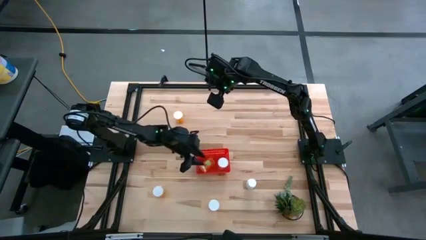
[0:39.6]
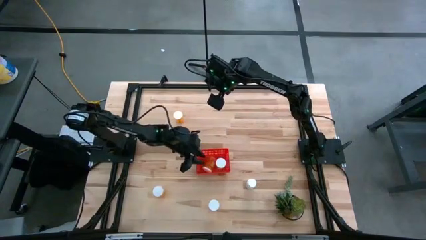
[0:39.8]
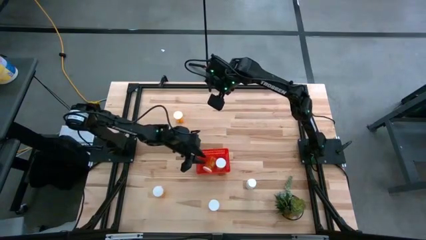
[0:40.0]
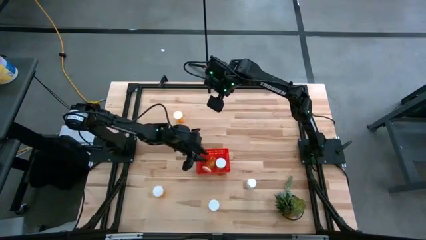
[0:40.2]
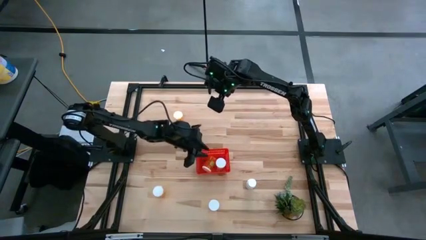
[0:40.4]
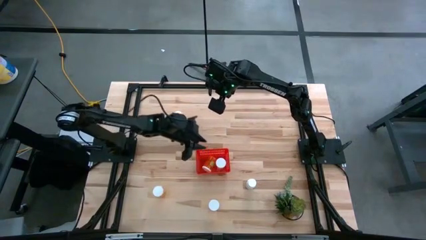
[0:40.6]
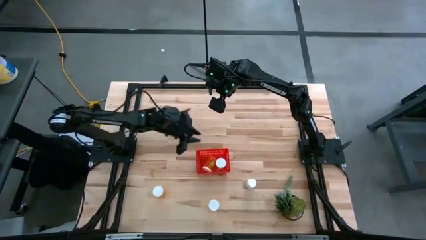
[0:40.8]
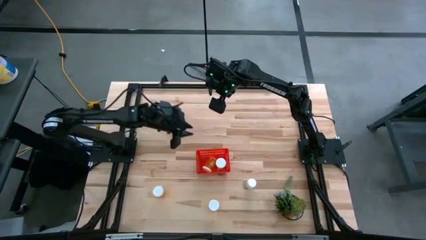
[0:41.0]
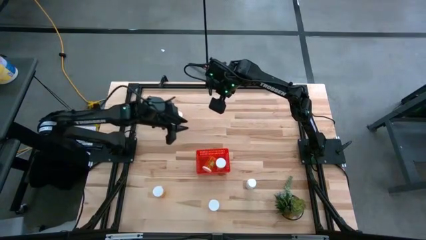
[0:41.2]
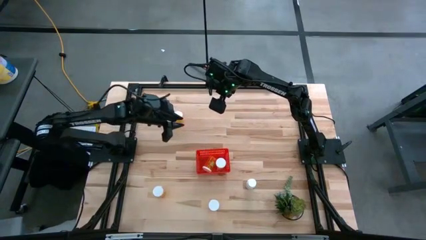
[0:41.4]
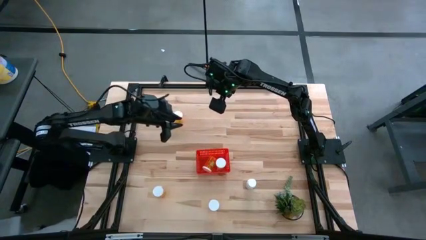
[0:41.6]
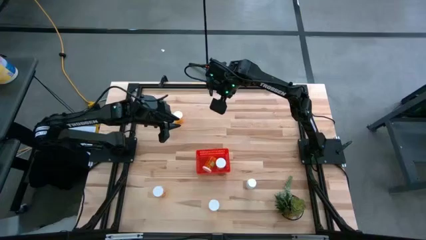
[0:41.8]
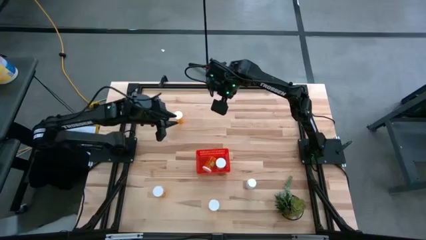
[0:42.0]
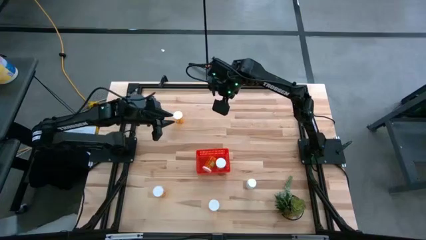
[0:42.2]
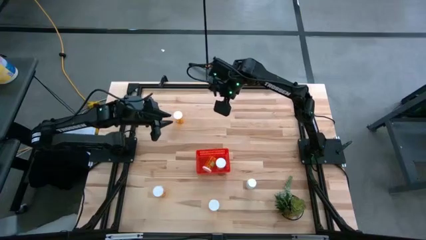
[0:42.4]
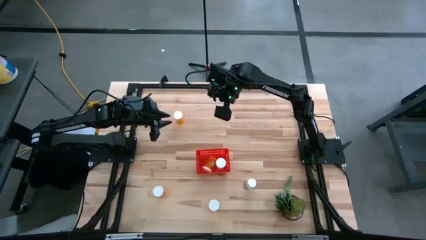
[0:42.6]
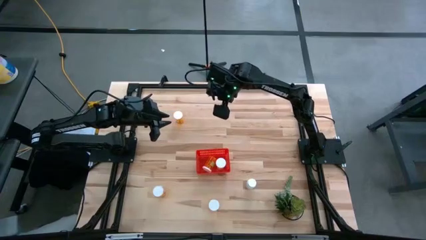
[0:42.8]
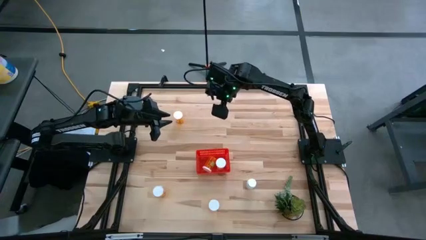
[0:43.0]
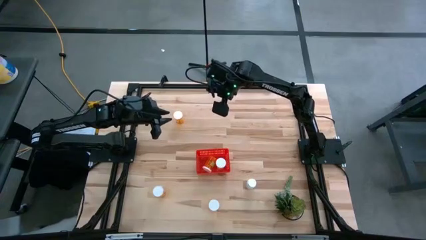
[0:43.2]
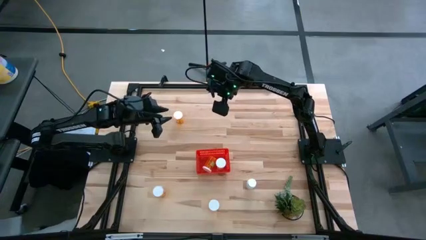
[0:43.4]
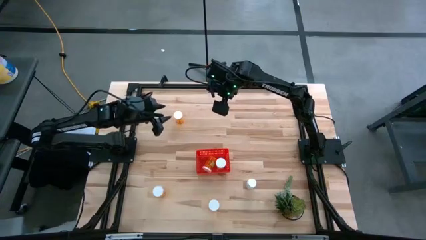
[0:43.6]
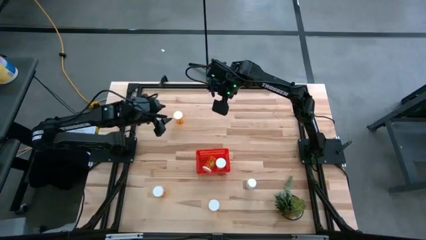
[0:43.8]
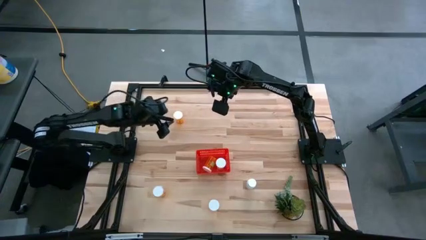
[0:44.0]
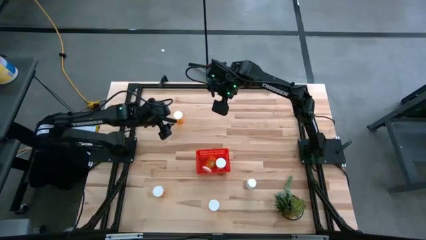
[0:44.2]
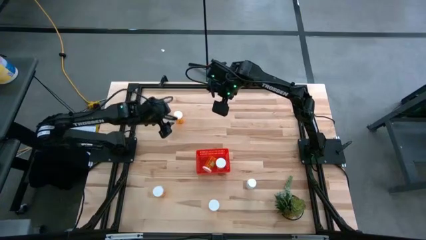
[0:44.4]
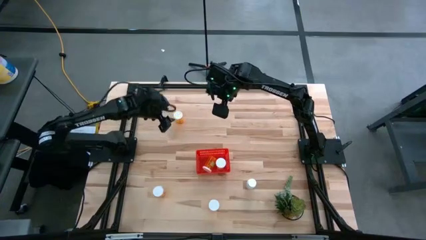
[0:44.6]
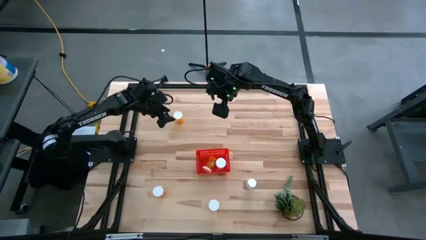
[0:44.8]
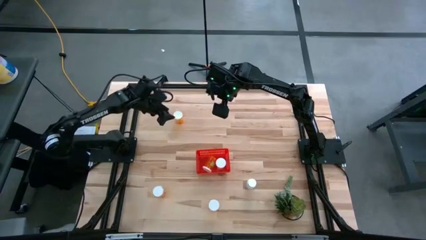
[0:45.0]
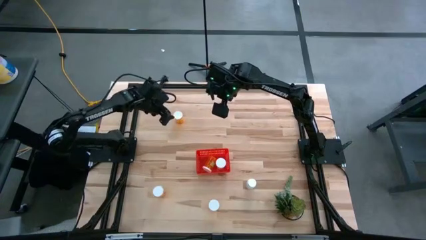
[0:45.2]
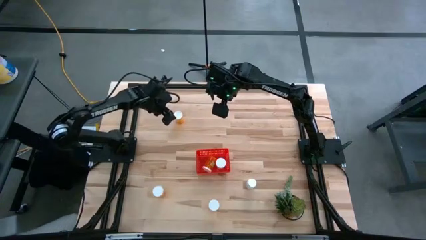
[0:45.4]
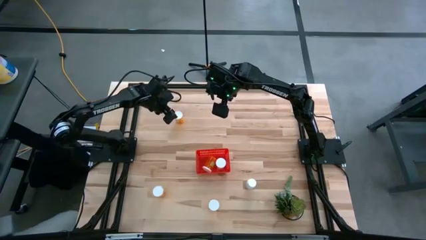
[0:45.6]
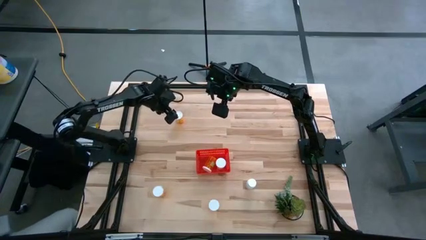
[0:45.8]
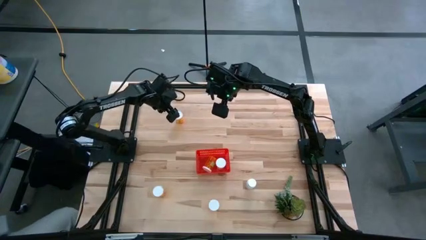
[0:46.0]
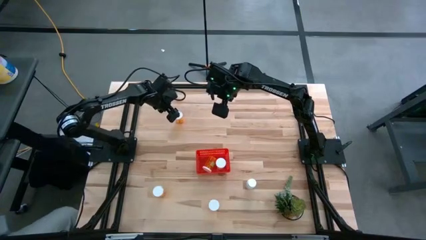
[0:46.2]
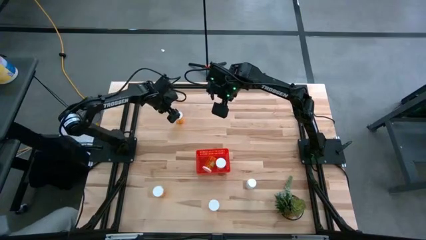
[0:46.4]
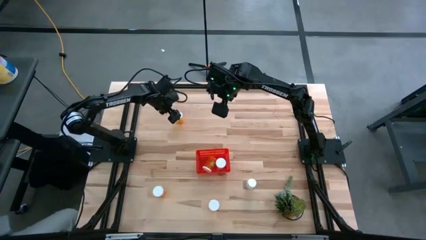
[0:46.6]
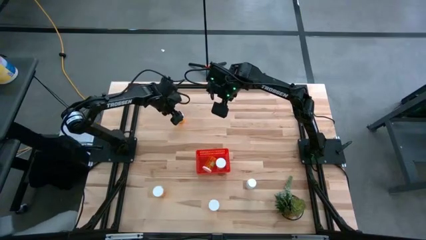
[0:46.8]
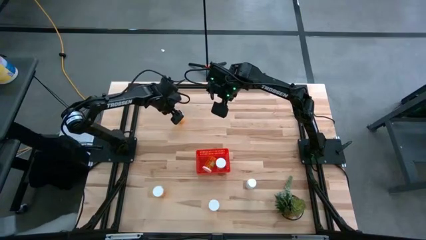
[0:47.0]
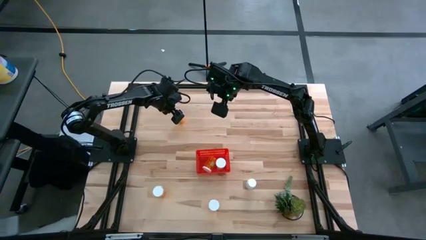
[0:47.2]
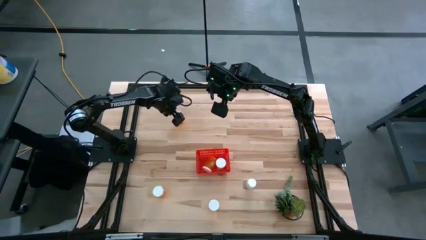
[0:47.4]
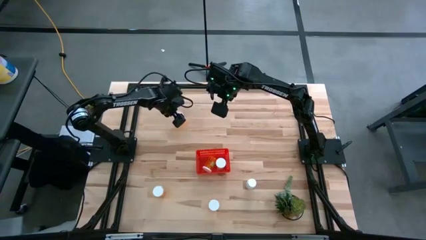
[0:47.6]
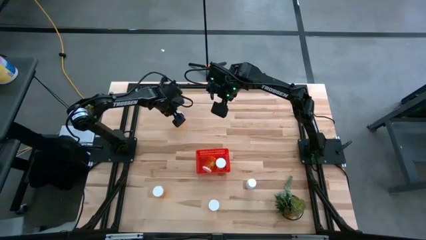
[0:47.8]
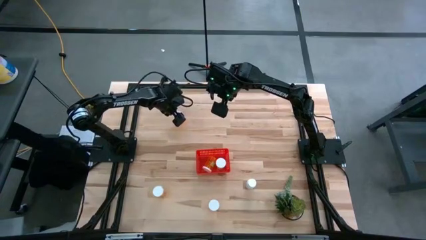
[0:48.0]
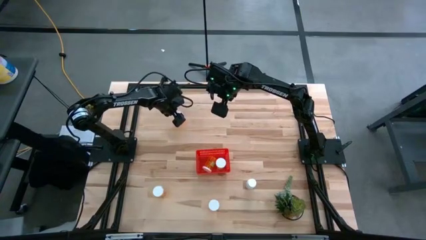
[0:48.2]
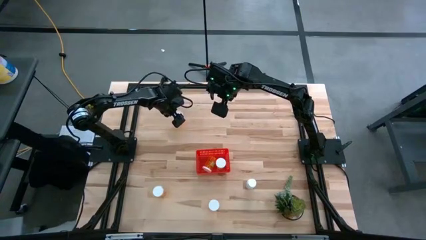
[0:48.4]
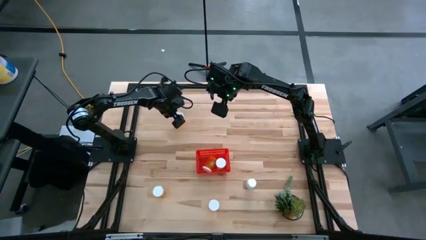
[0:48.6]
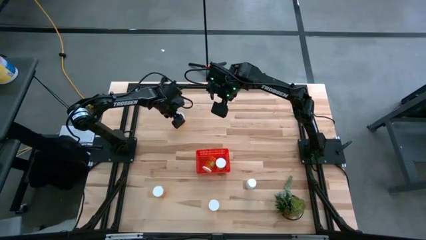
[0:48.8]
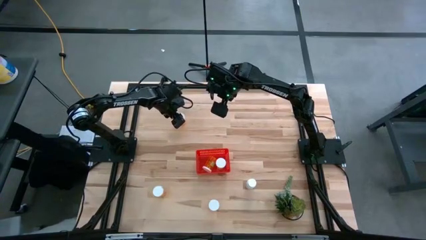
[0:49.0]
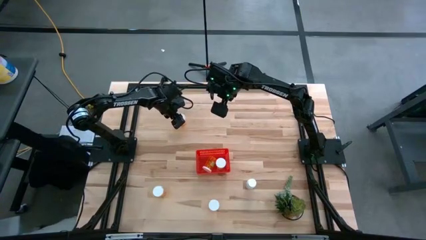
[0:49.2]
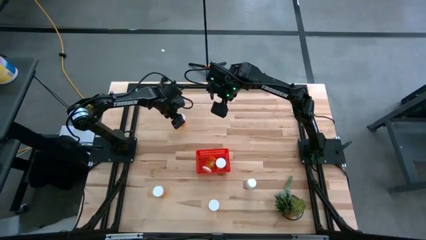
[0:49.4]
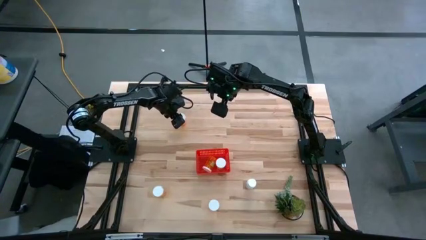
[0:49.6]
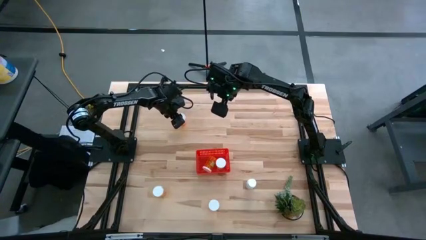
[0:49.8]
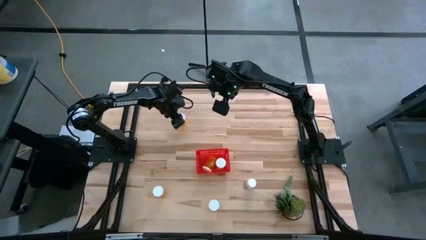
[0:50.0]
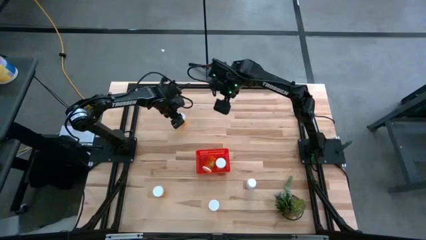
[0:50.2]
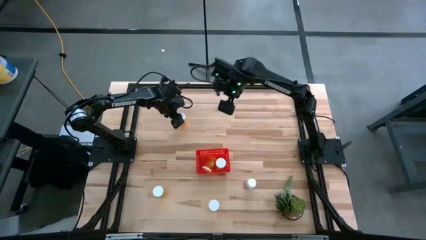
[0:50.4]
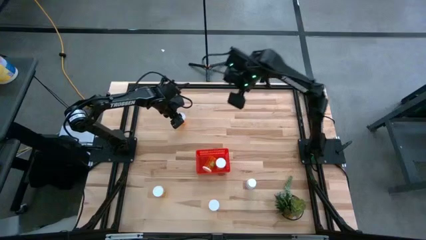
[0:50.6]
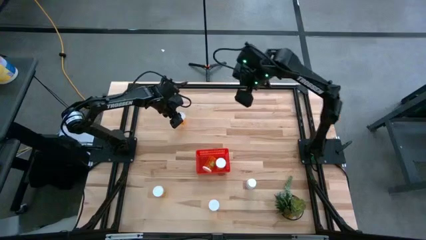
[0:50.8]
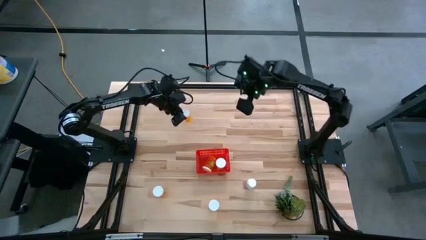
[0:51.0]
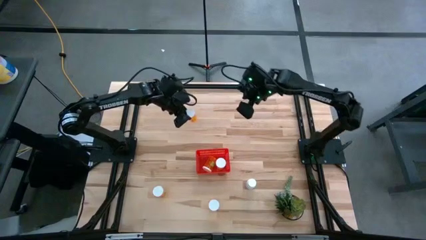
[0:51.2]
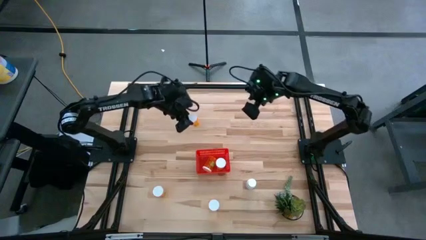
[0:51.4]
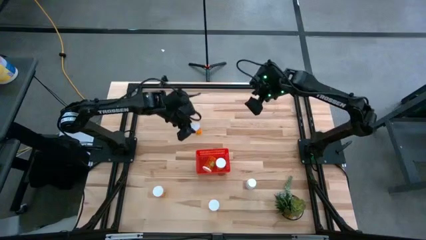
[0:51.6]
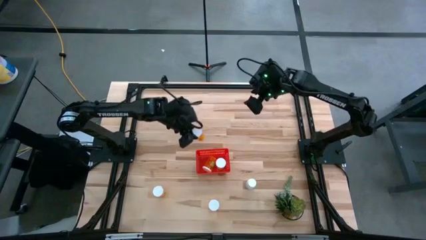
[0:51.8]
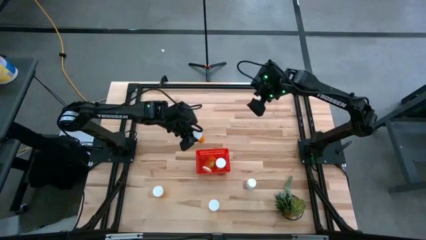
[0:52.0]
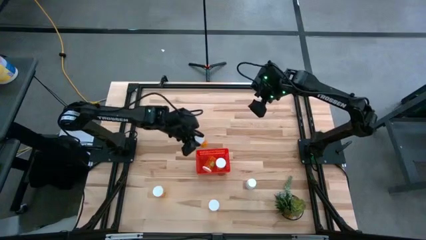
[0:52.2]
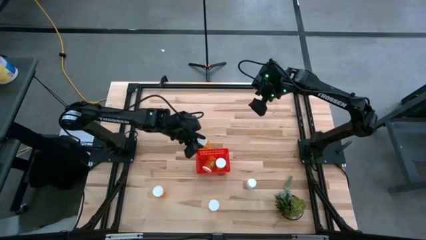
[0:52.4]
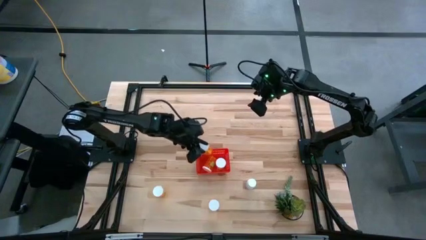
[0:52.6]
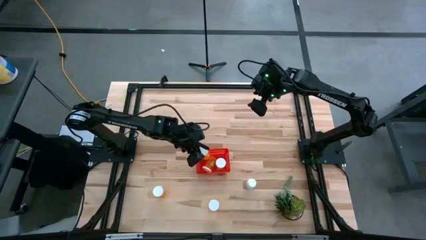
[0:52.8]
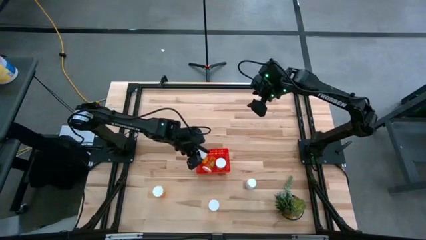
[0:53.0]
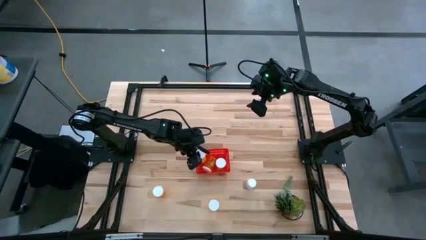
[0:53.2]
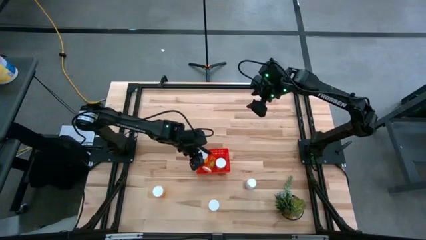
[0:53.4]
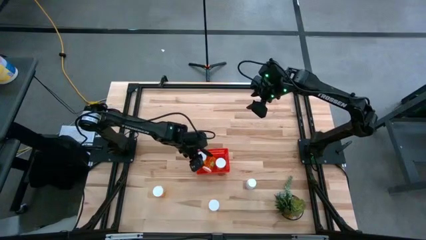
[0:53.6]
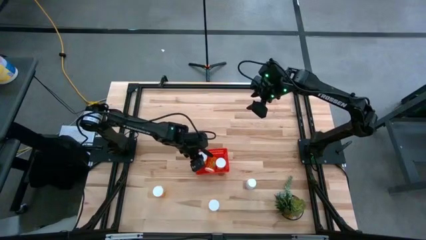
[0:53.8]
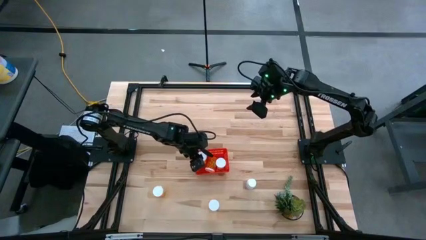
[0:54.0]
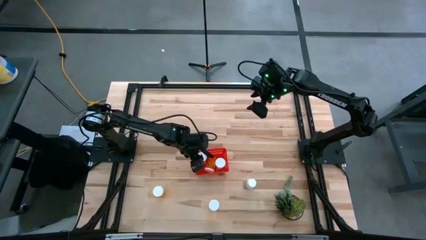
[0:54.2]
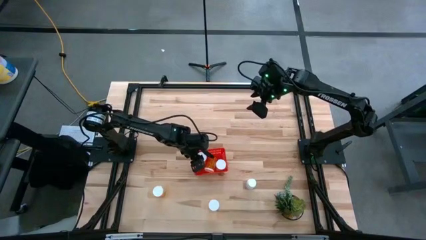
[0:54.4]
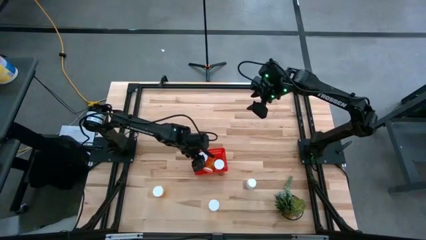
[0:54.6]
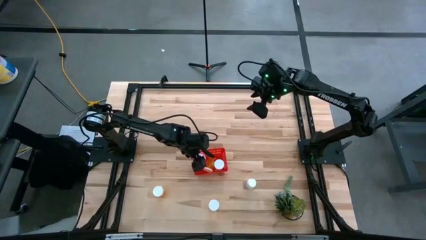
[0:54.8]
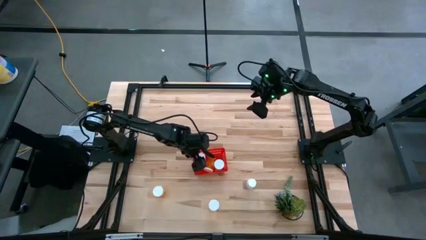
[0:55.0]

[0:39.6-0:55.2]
Task: Pick and place pill bottles into a basket
Put the orange pill bottle into the red basket

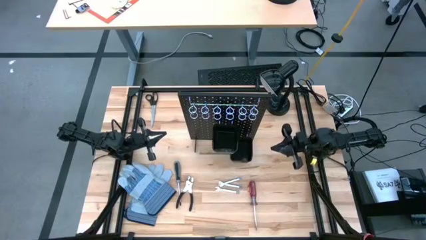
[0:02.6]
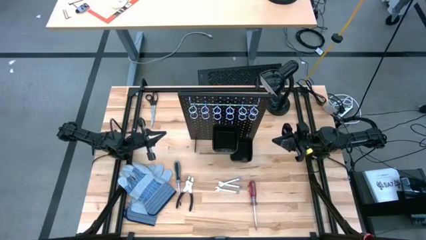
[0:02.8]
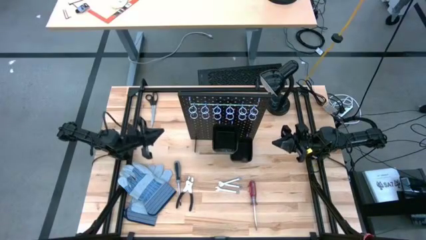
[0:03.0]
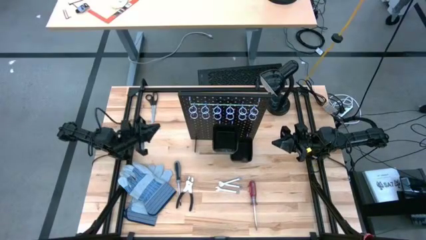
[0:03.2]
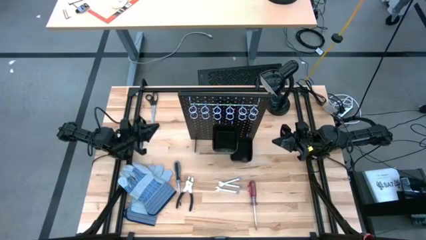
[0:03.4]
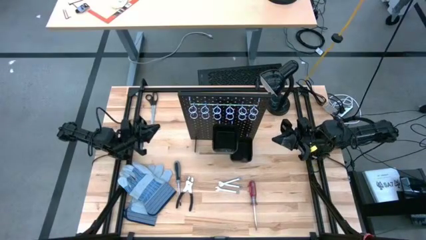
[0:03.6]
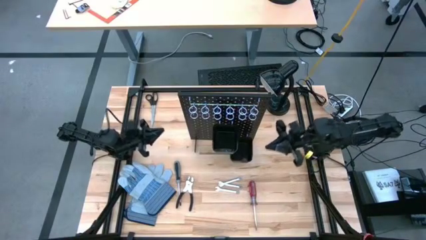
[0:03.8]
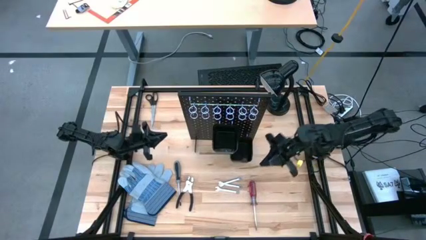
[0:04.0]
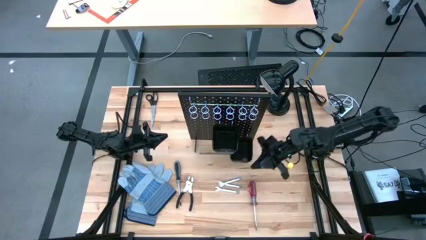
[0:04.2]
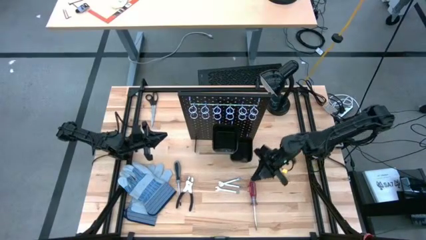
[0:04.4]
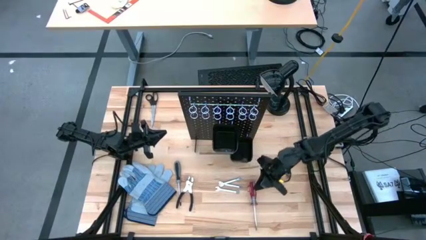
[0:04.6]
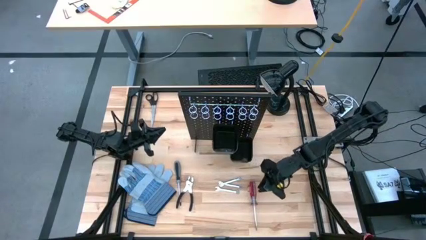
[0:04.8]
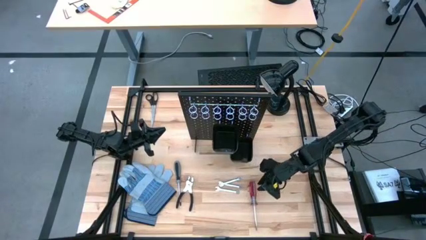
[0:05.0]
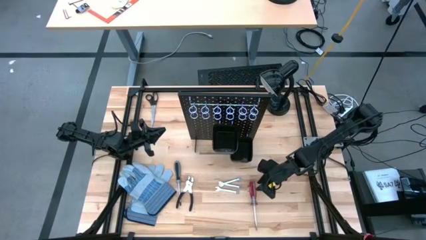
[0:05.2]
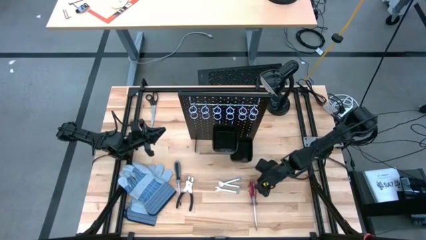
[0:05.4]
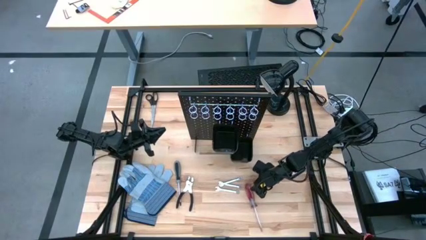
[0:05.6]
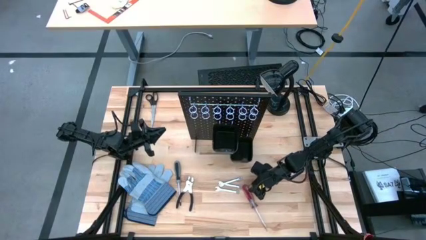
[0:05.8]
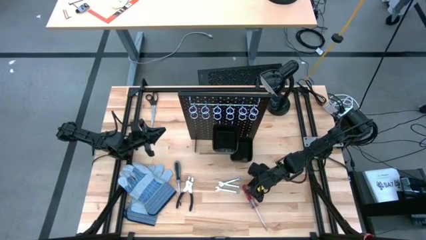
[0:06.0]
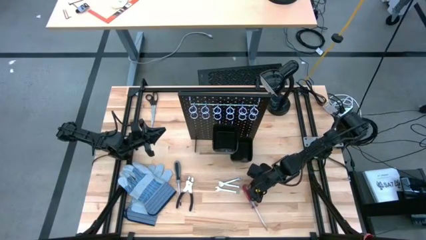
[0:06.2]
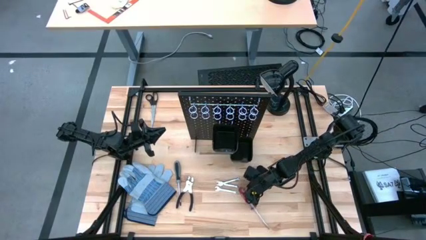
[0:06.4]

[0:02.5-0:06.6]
Task: Hang tools onto peg board
Hang the red screwdriver on the black peg board
